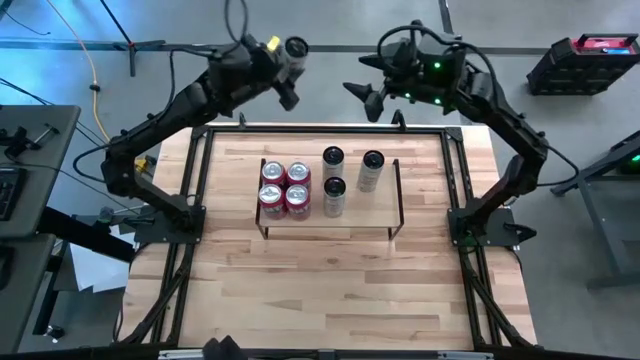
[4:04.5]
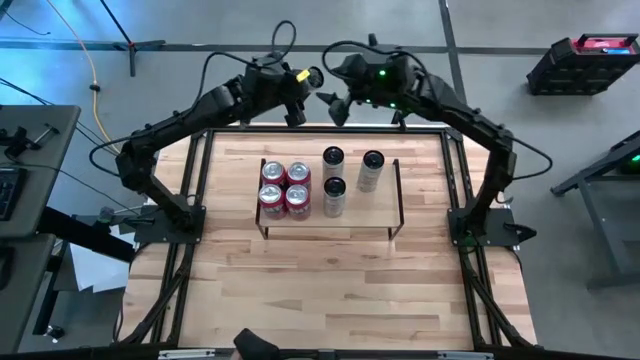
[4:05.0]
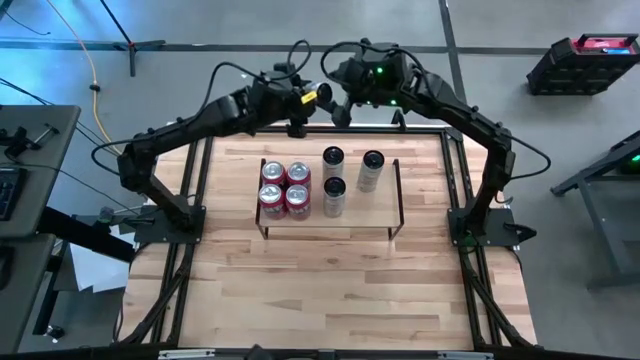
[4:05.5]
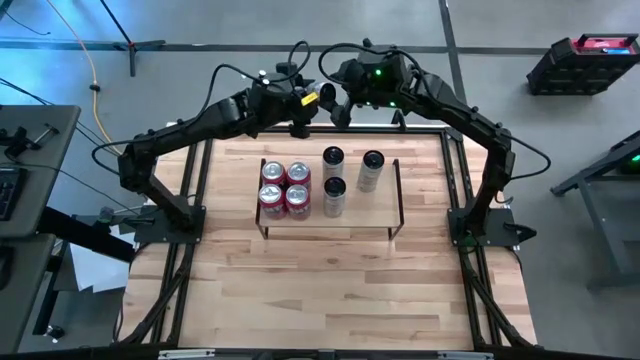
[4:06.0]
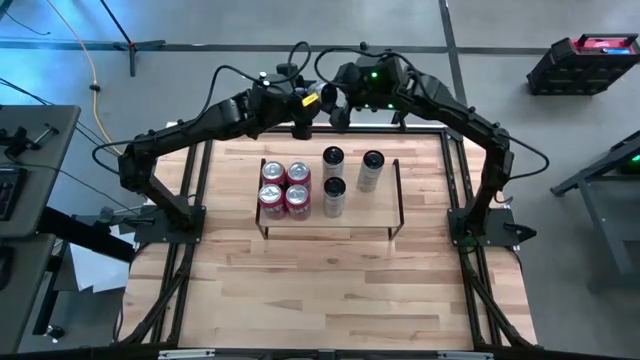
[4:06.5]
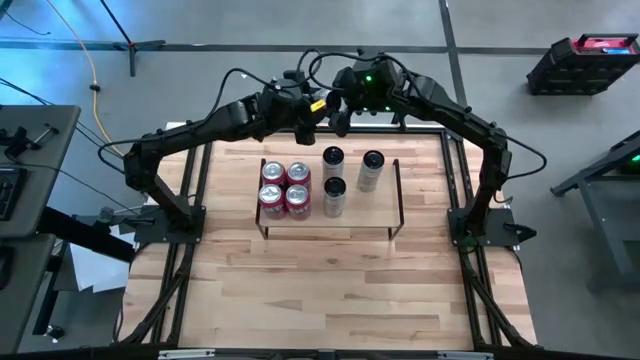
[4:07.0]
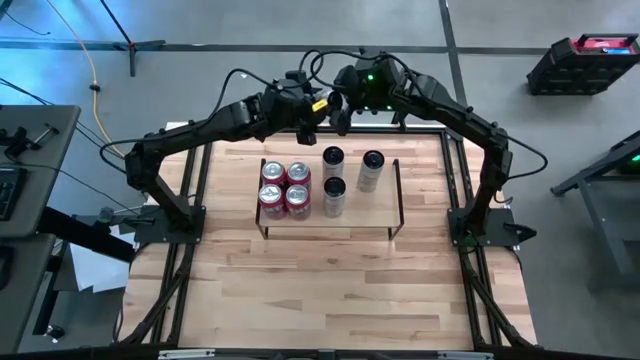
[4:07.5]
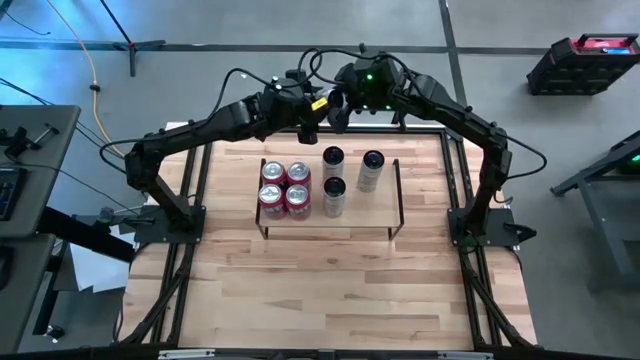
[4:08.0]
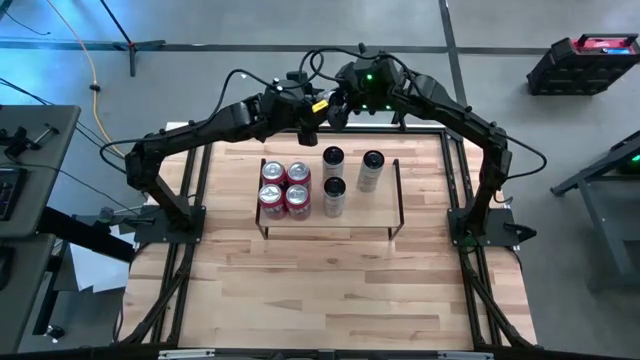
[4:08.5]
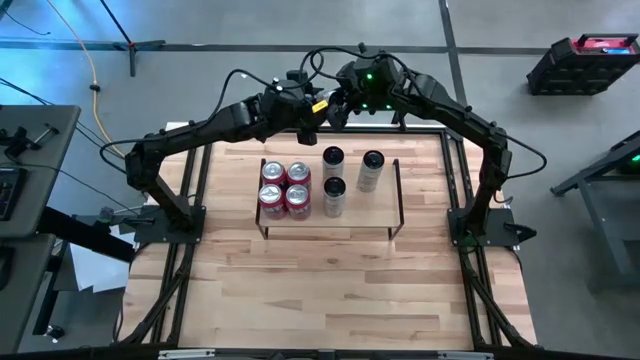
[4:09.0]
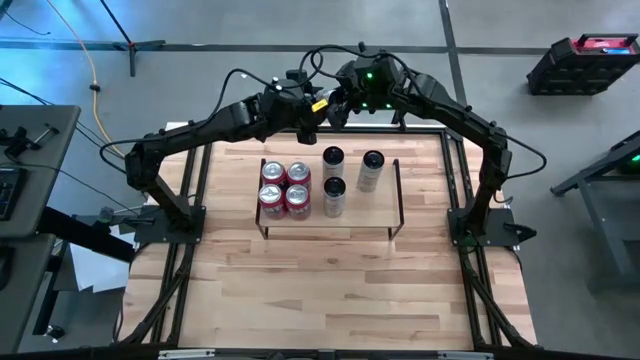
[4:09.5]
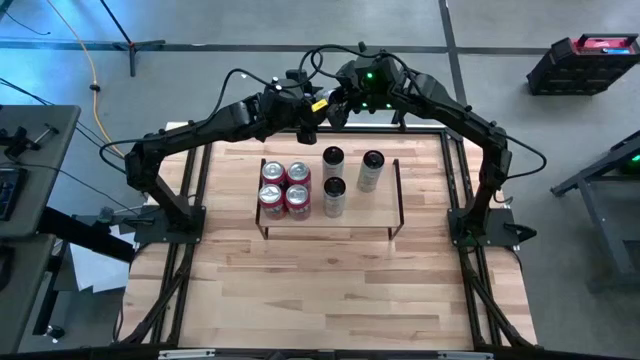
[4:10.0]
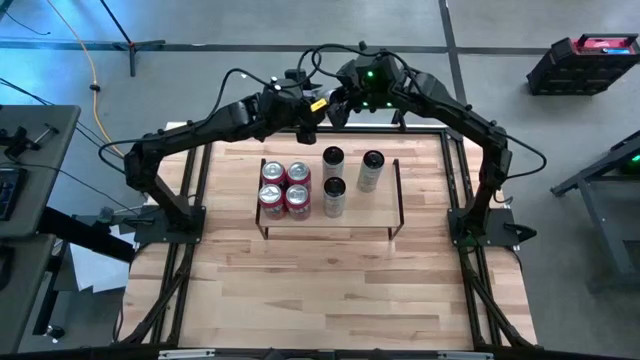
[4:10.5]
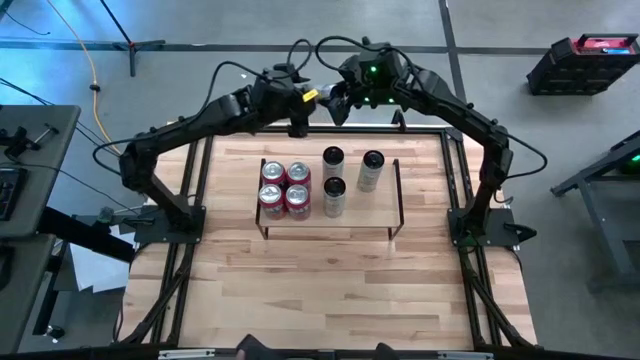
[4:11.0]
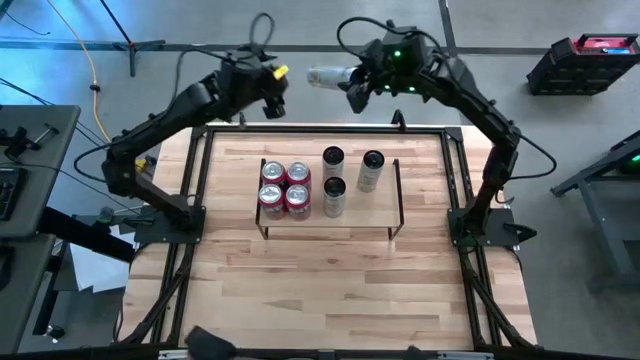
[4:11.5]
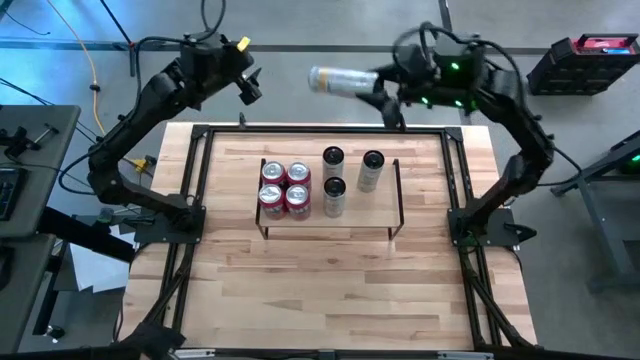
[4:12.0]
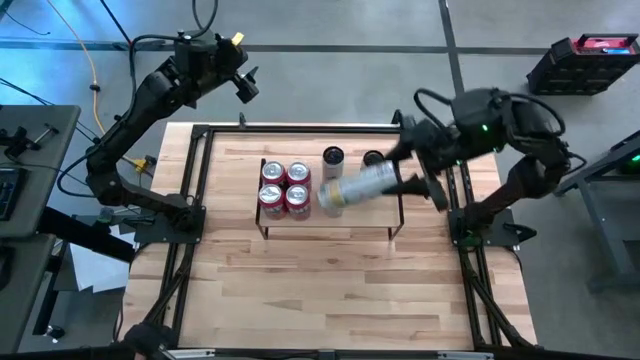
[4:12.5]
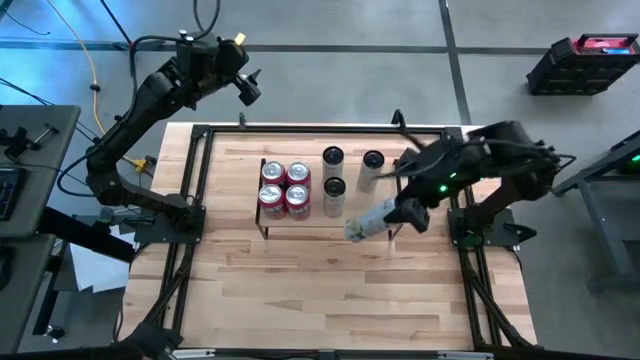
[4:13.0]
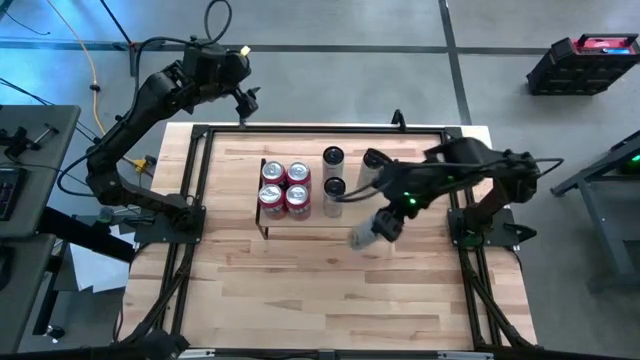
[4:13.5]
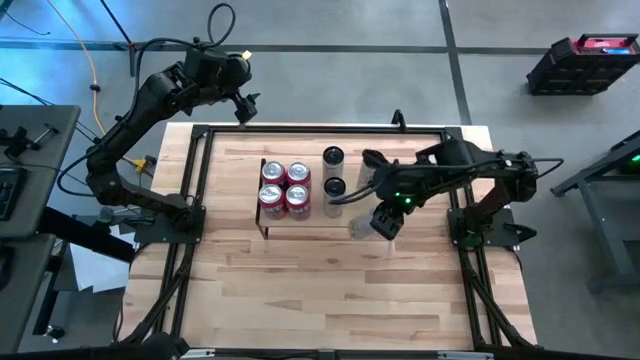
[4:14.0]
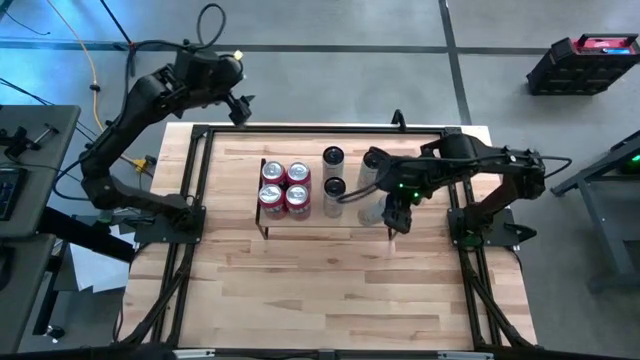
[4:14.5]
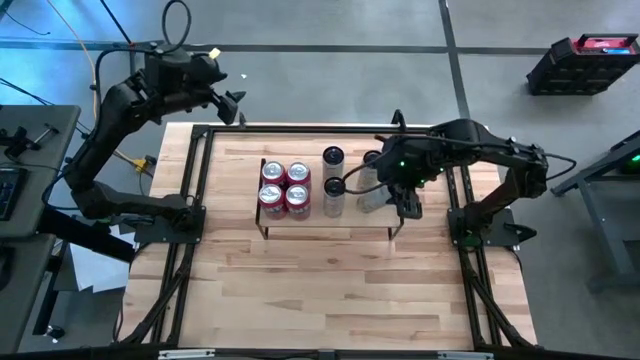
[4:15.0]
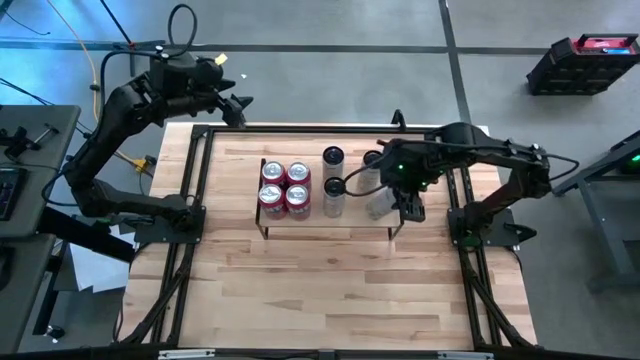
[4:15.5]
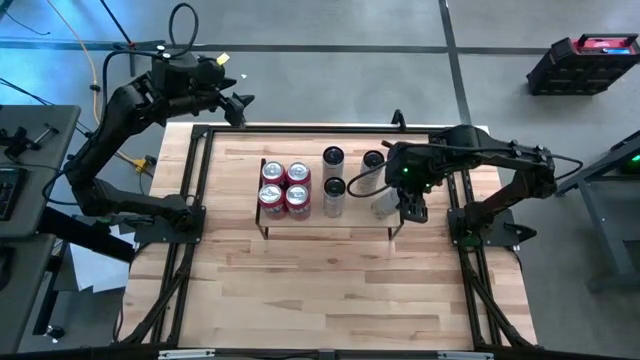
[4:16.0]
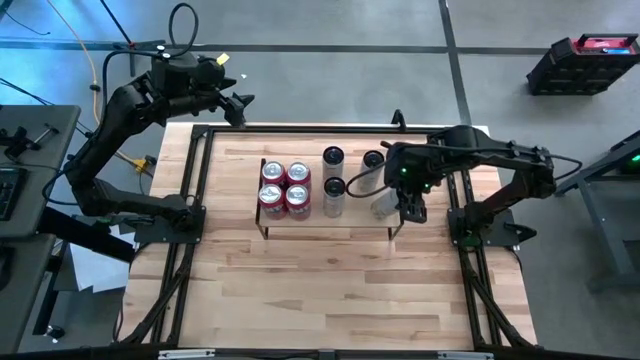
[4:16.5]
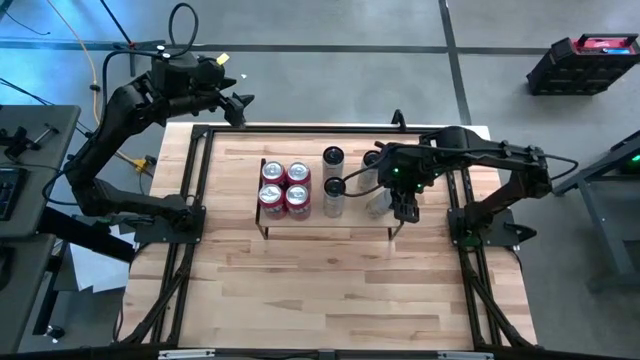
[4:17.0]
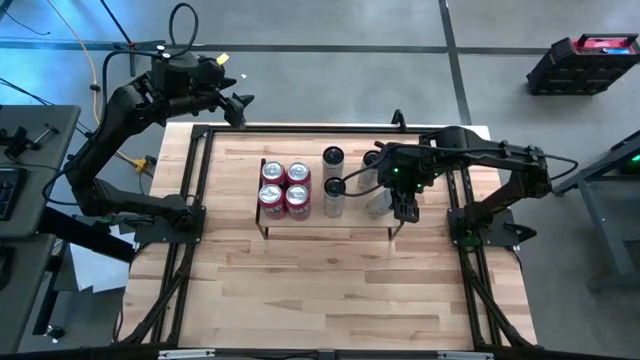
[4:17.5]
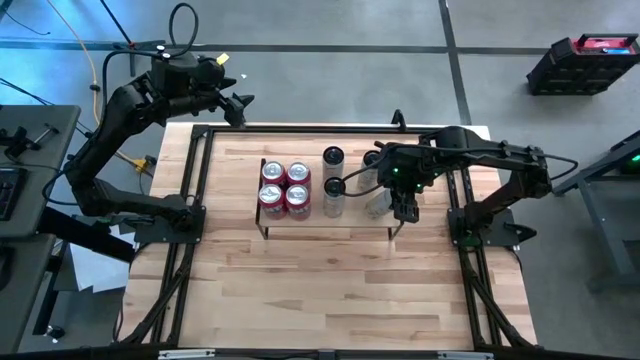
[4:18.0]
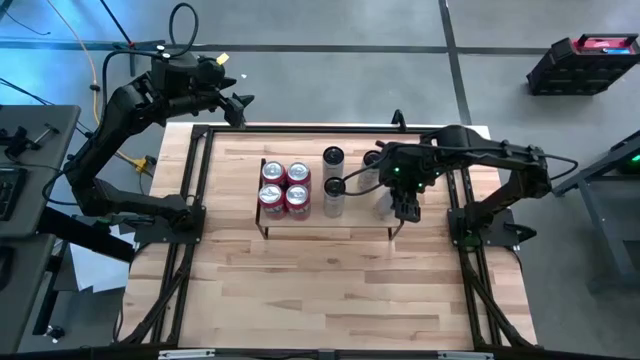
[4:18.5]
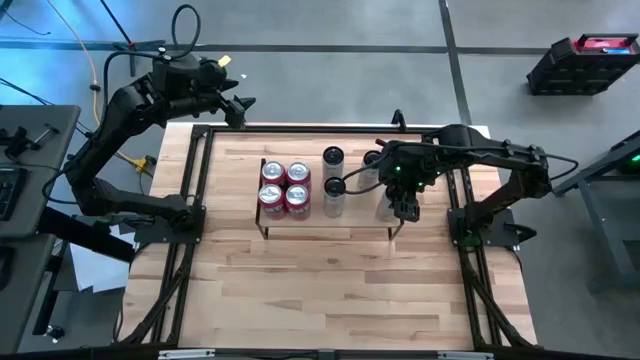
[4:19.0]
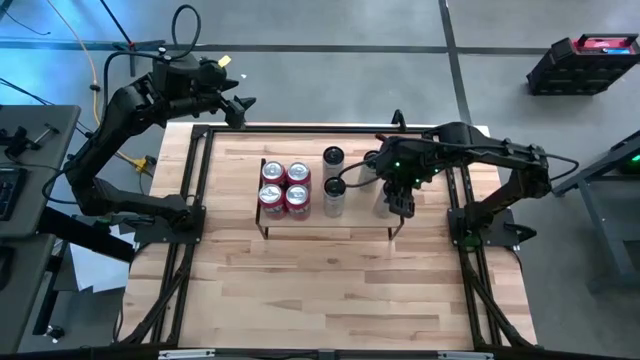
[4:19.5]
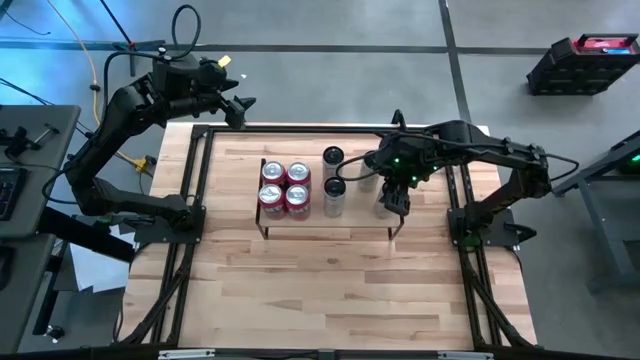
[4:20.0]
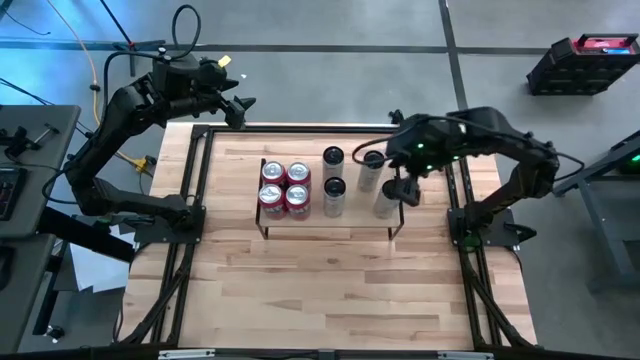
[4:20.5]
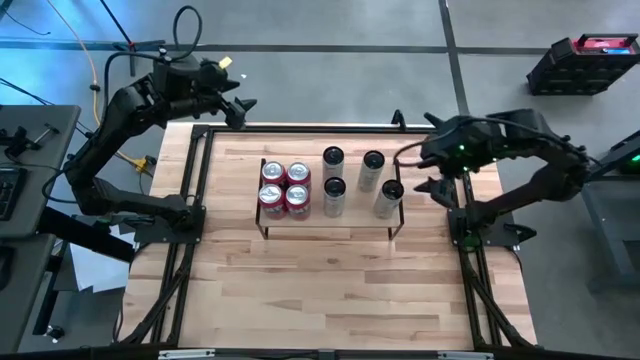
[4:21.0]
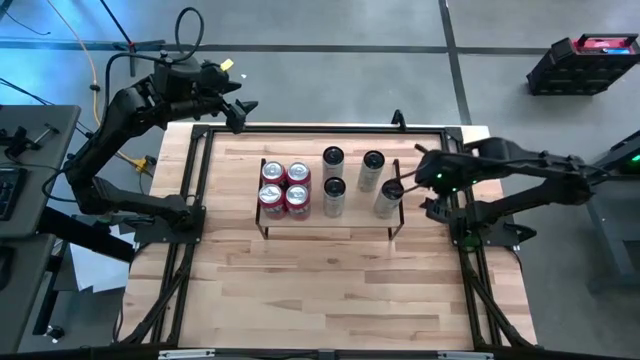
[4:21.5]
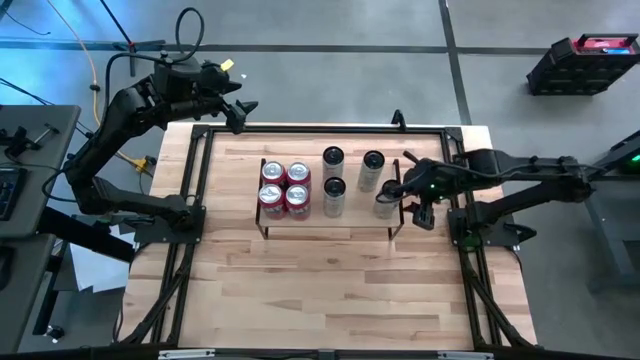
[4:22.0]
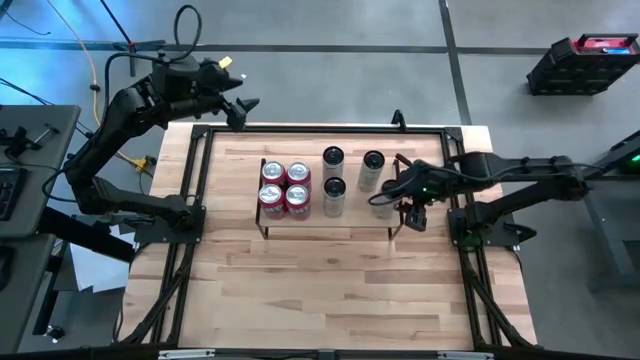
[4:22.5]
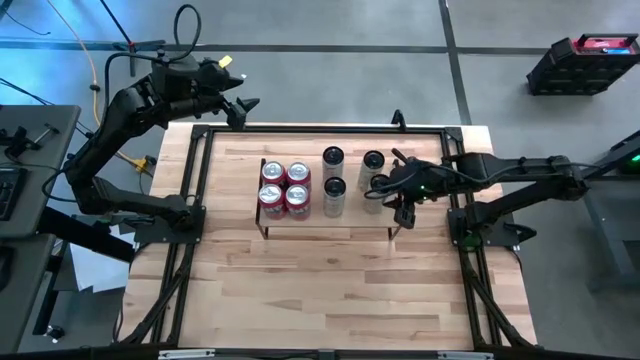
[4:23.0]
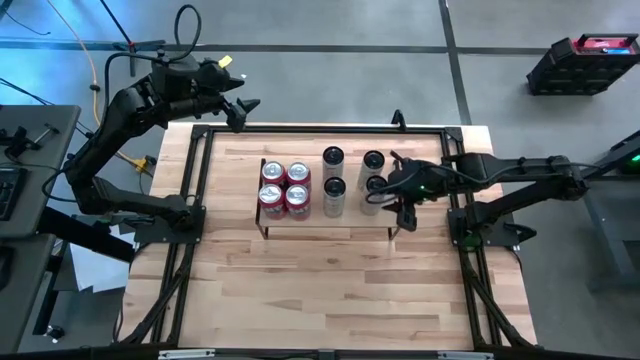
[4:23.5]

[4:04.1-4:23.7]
Task: Place canned beverage on shelf
Put the white yellow soda can on the shelf aligned with the other white yellow soda can

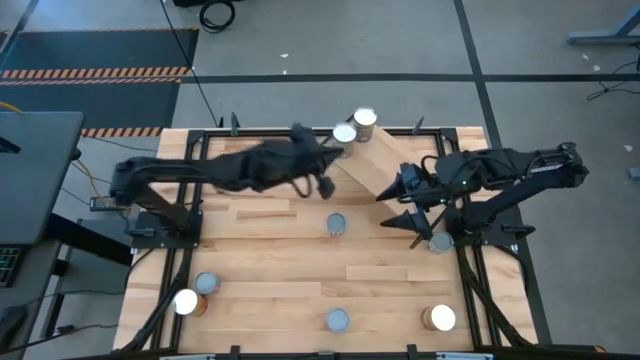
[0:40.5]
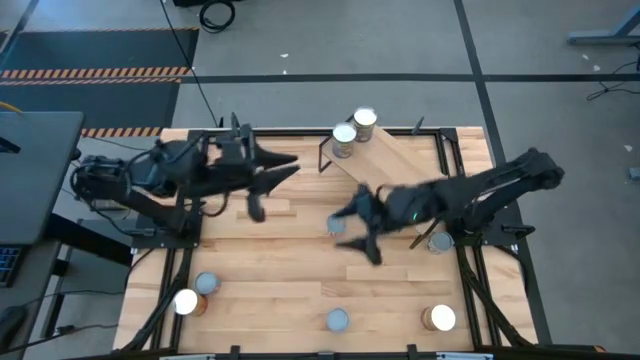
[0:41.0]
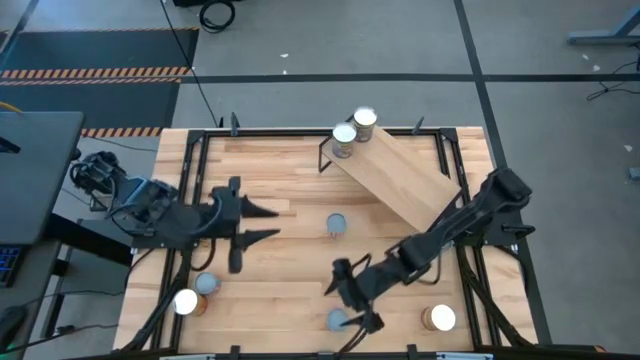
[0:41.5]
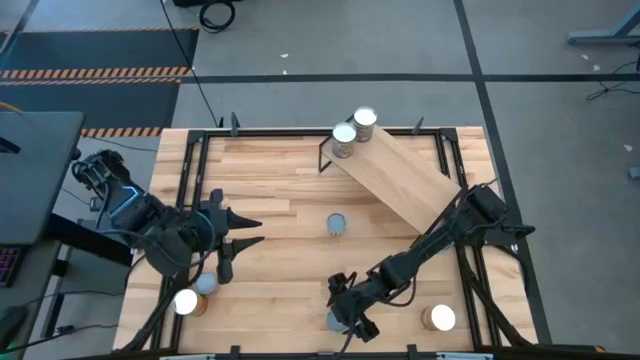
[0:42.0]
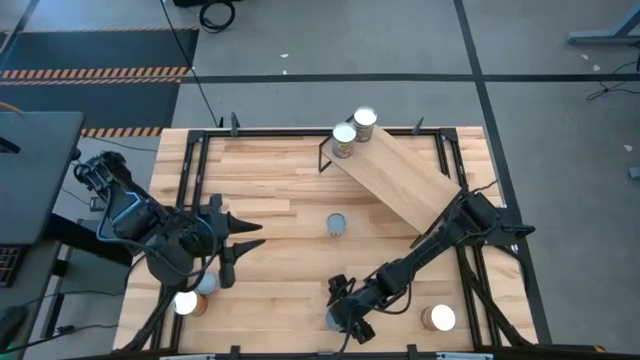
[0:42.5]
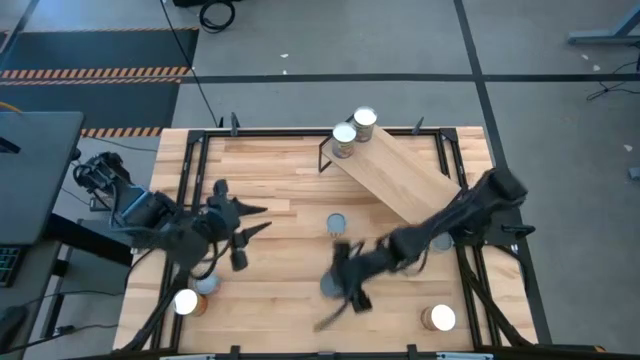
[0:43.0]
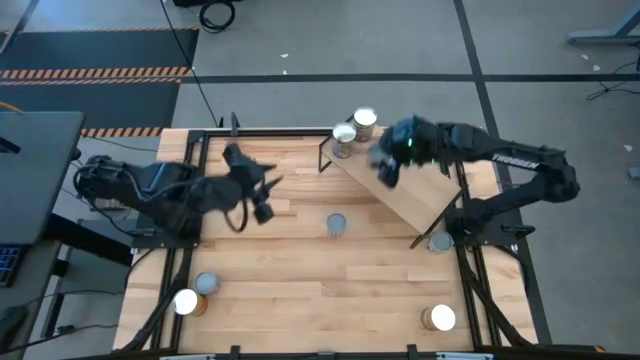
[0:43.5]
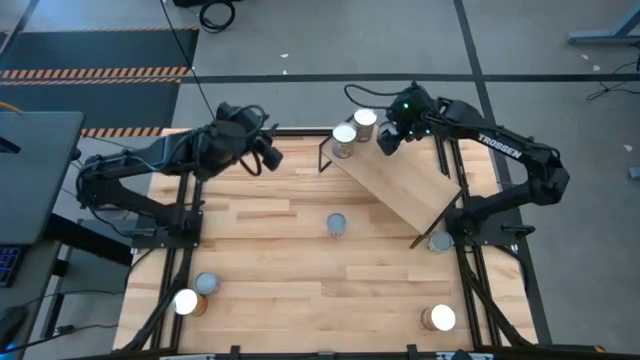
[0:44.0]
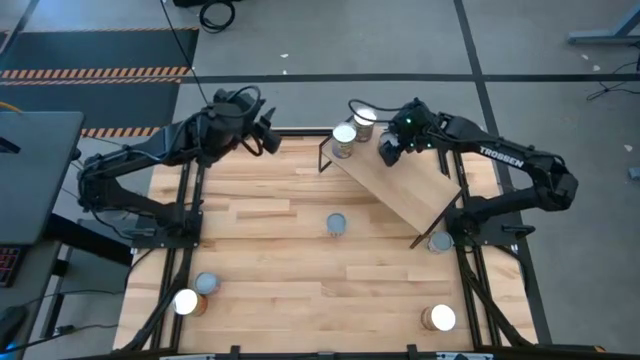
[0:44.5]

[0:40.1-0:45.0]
Task: Pick and place cans onto a shelf
Put the canned oranges can on the shelf
